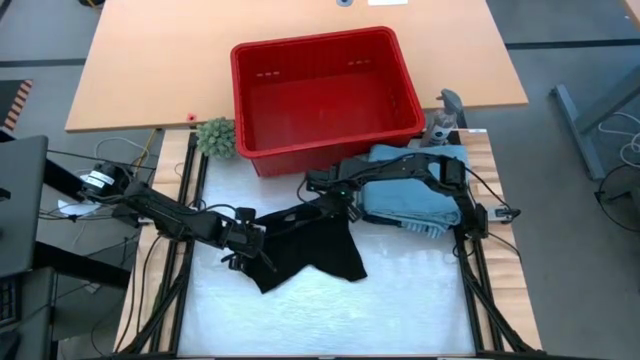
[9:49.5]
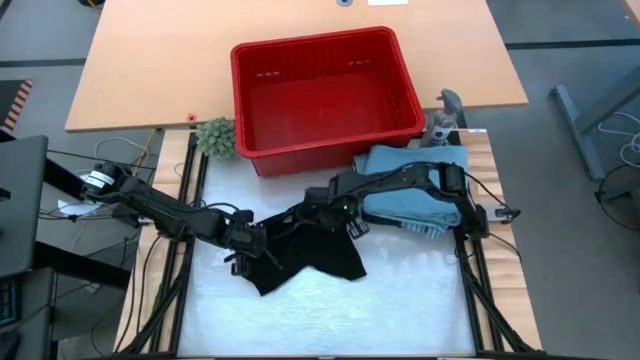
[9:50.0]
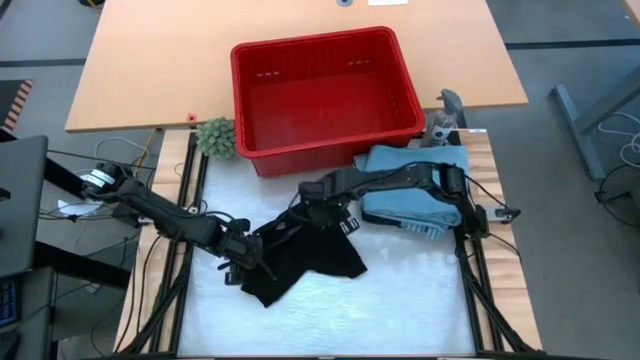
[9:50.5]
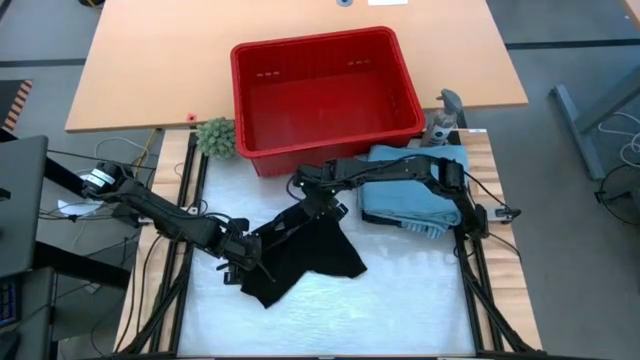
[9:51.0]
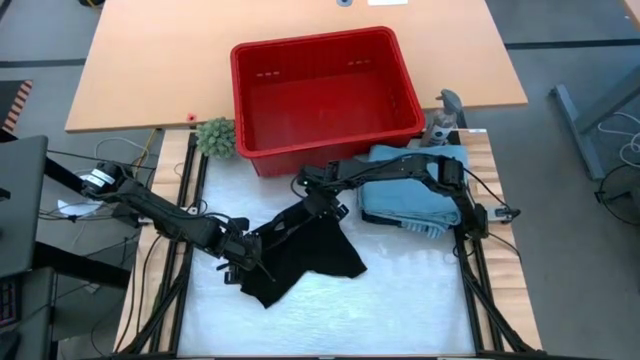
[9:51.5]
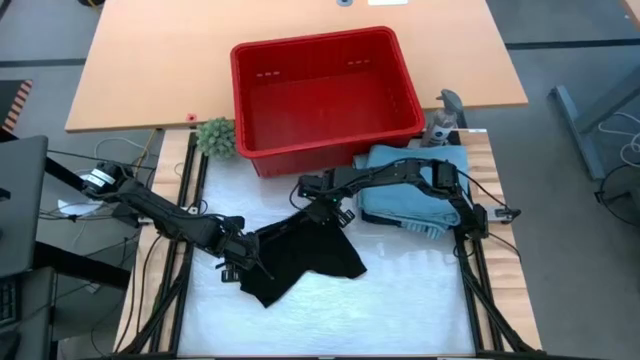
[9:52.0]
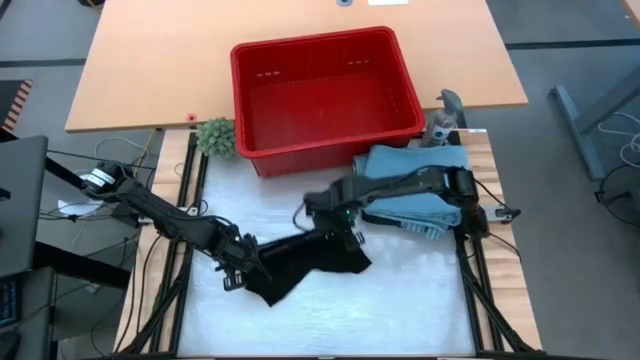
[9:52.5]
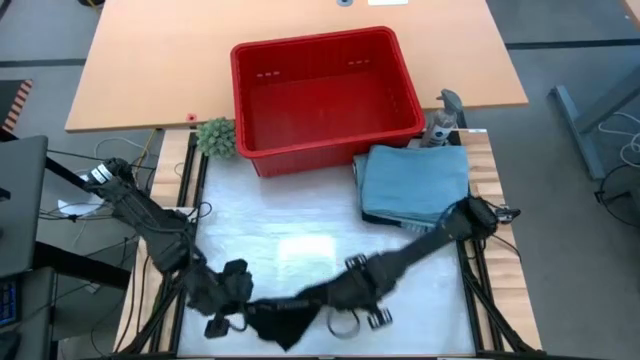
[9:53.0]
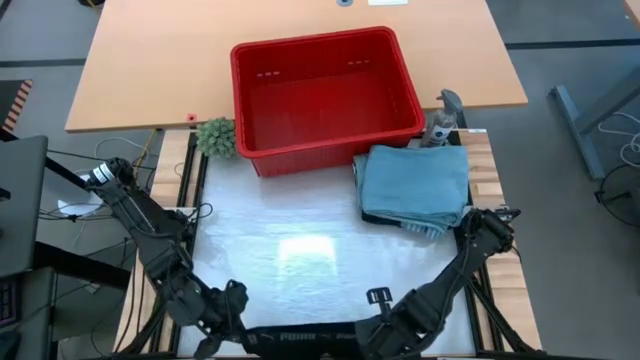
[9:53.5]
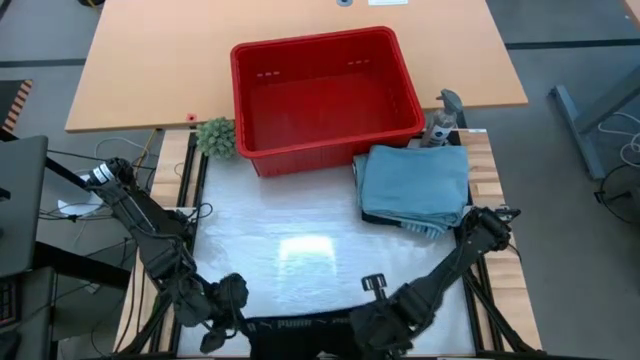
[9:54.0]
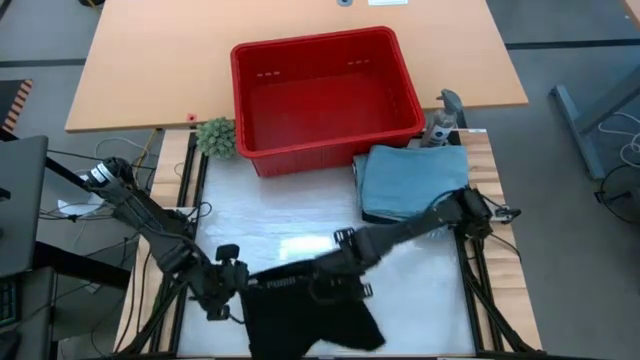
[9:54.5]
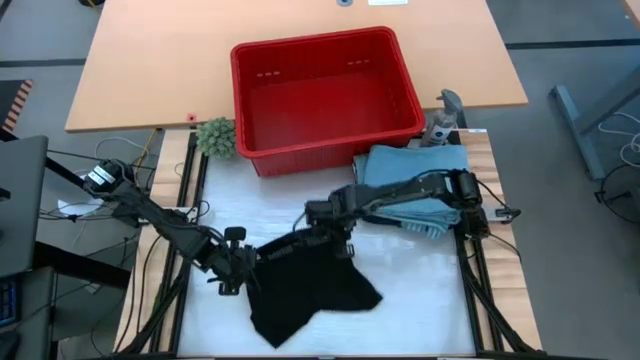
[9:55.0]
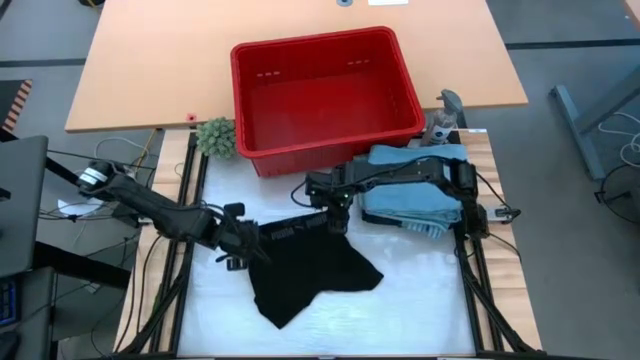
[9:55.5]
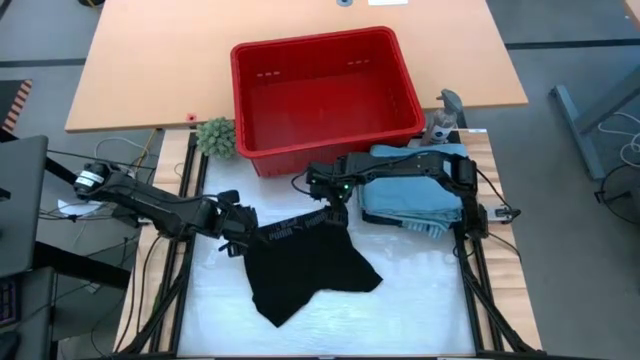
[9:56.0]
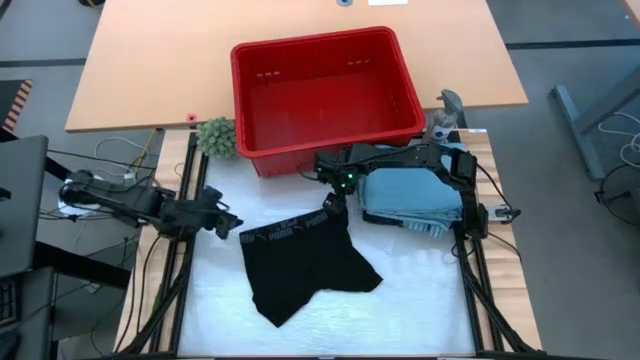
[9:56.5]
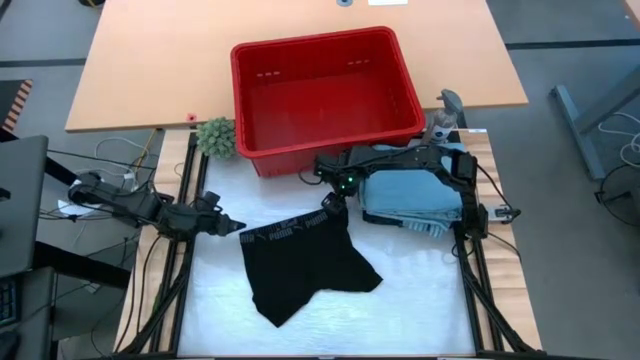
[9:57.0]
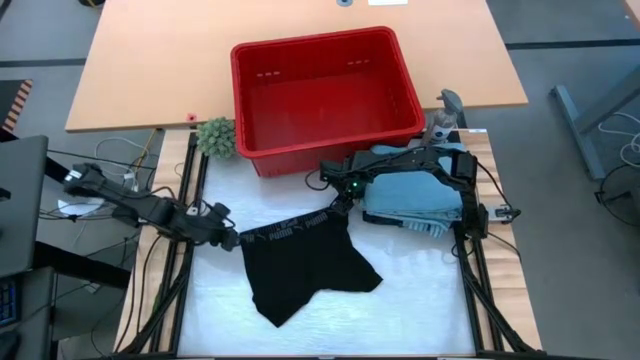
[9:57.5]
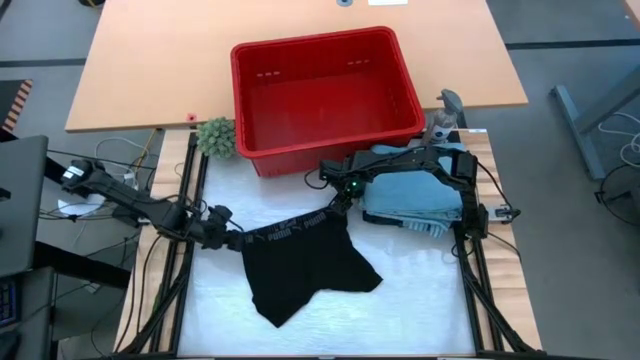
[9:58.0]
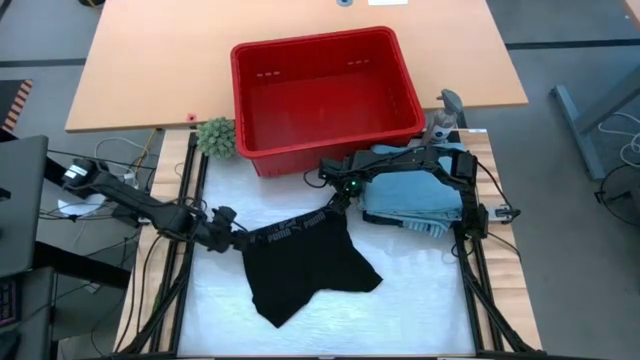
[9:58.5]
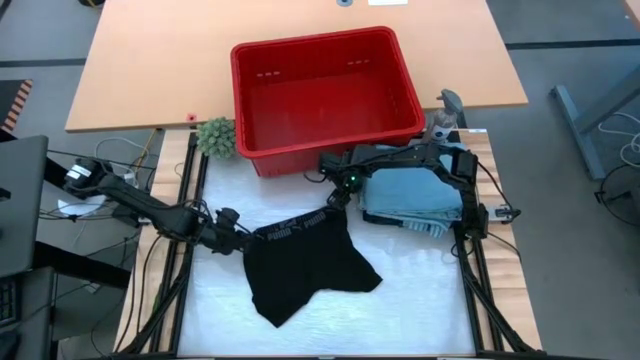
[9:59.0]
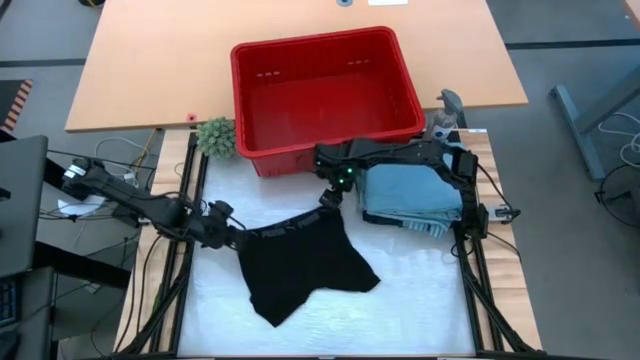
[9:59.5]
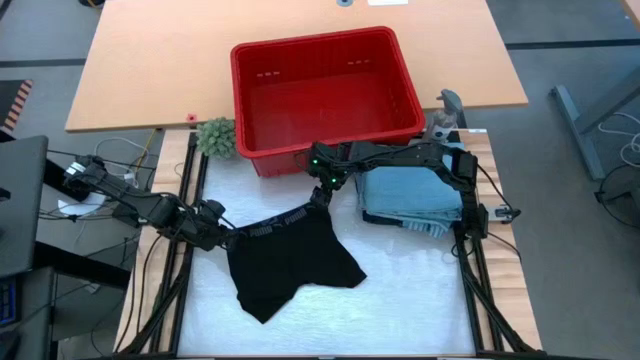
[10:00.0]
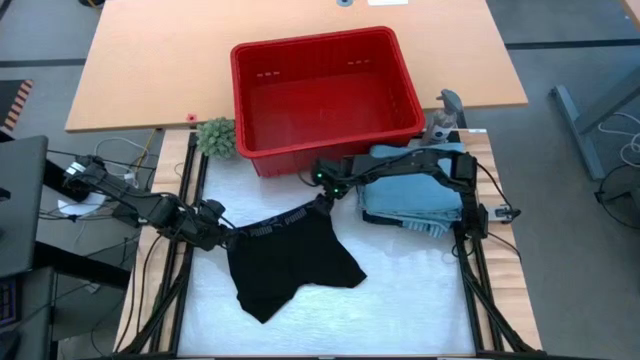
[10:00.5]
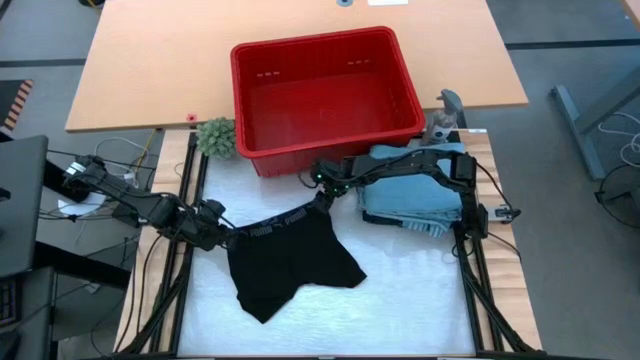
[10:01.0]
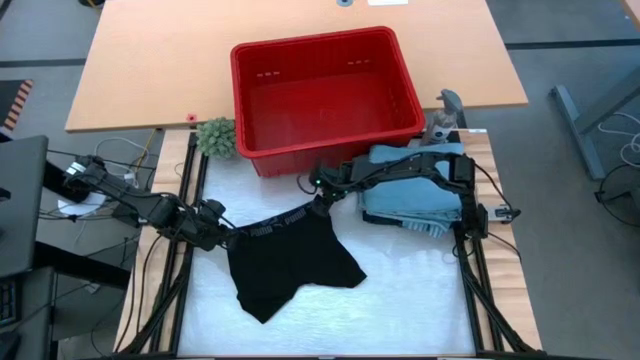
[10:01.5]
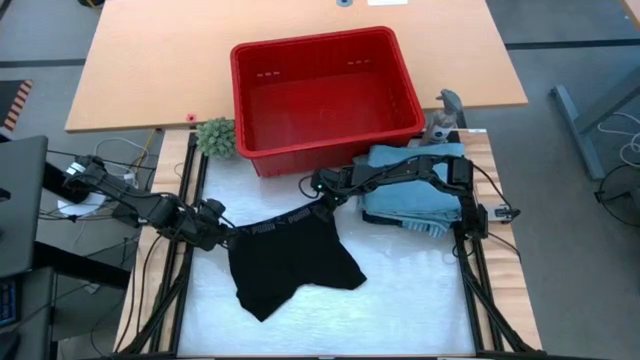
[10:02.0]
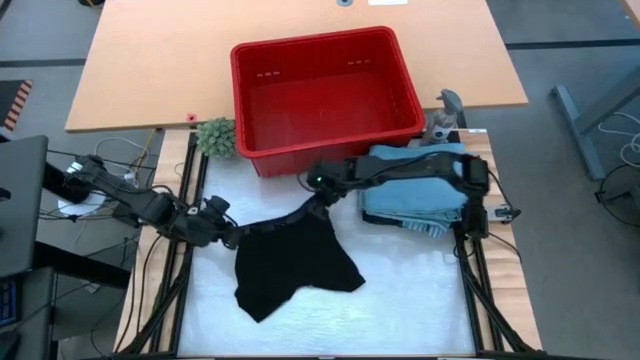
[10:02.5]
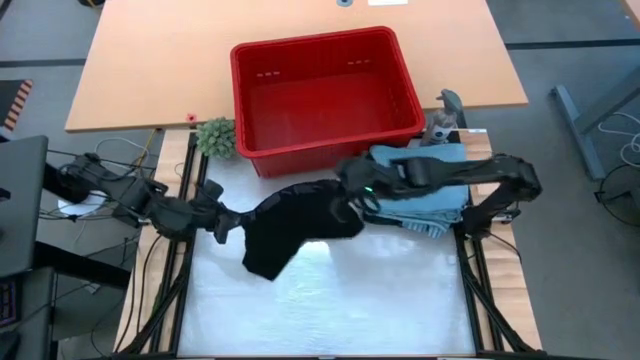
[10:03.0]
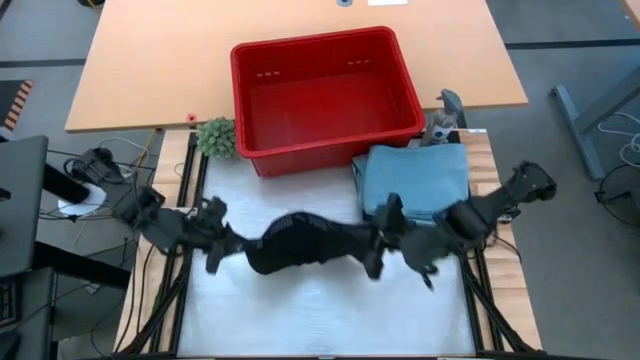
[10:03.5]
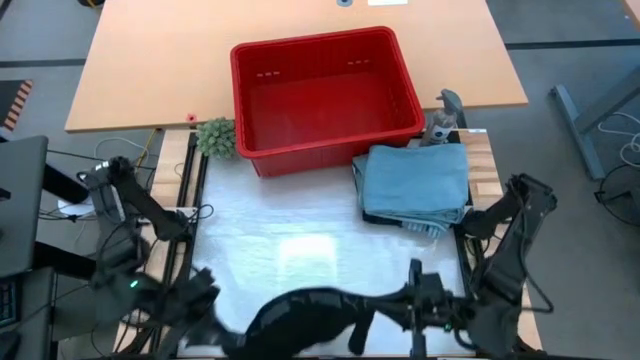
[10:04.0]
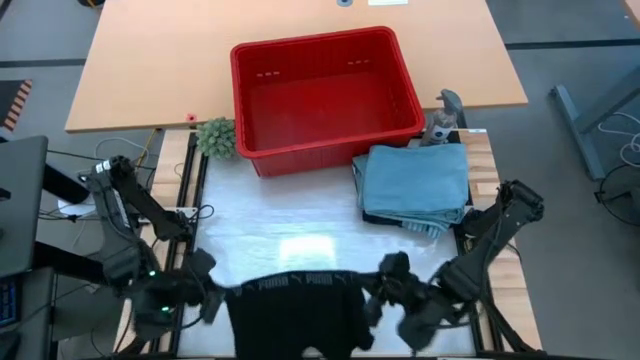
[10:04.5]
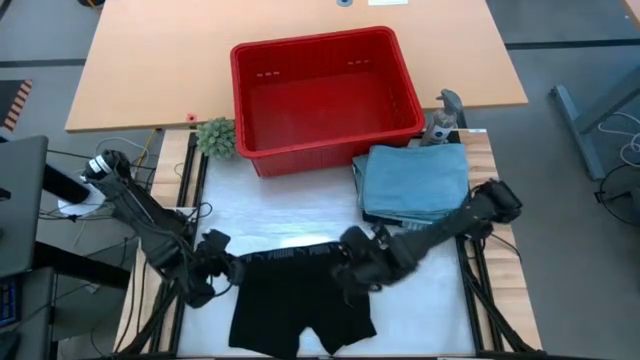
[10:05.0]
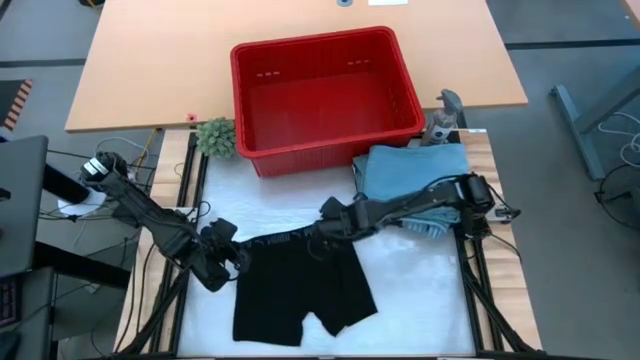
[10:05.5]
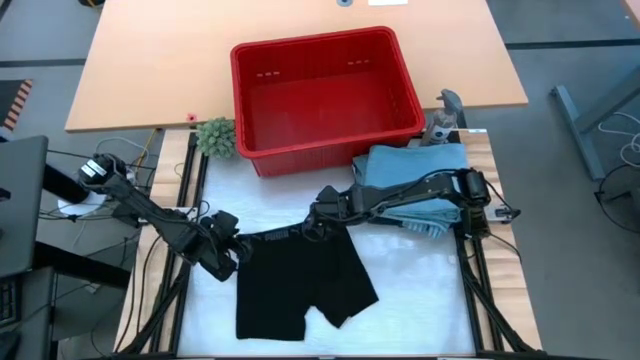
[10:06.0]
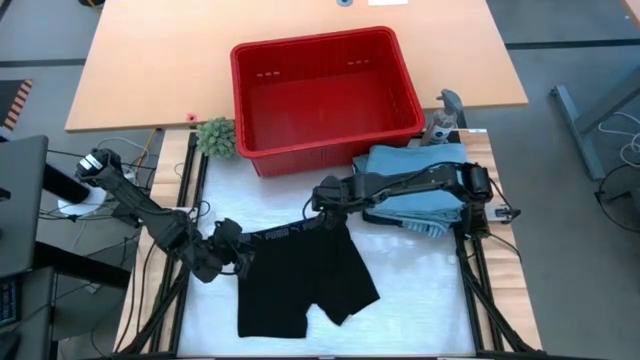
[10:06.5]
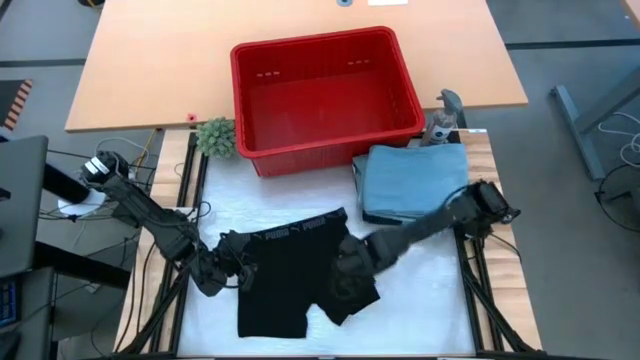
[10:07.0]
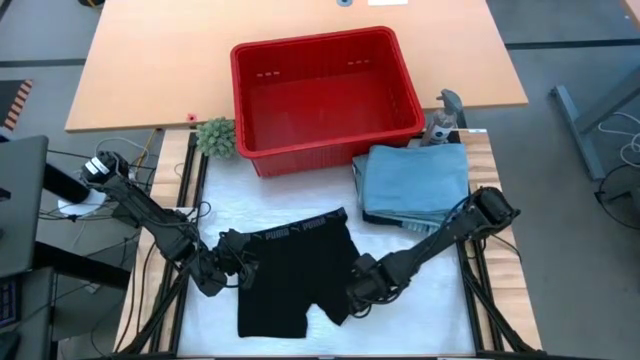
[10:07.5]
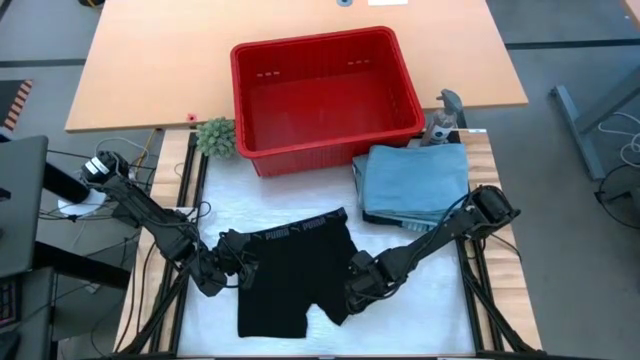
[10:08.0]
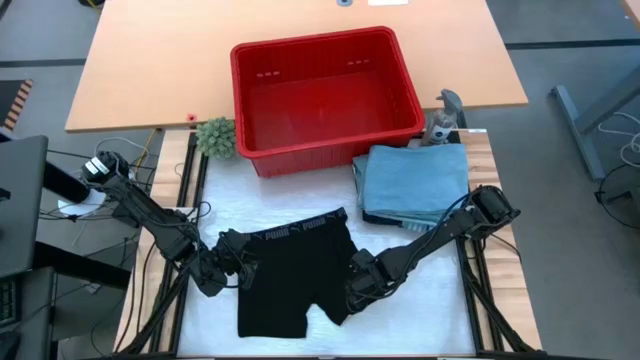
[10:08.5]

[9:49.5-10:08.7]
Task: Fold Laundry from Bin
Fold the black boxer short

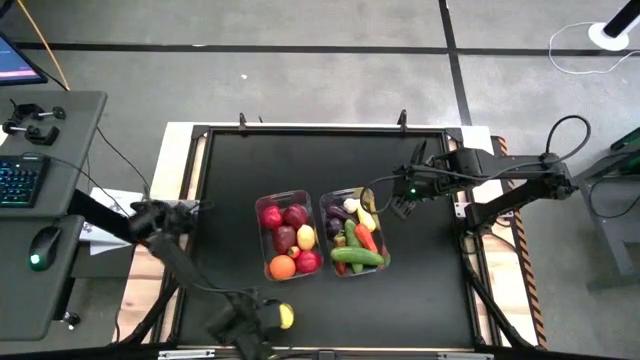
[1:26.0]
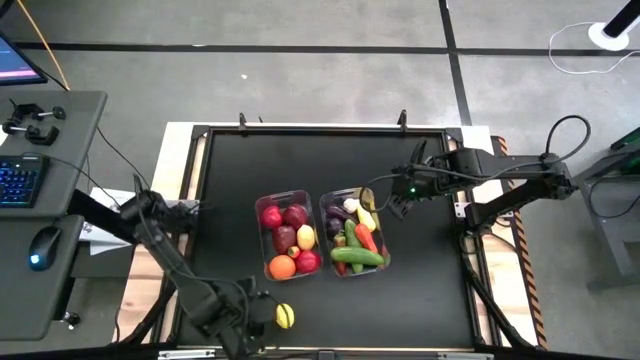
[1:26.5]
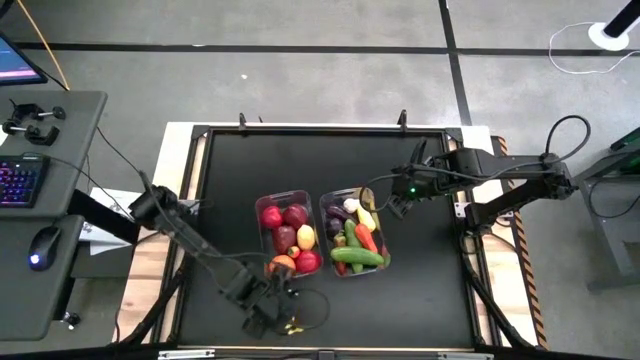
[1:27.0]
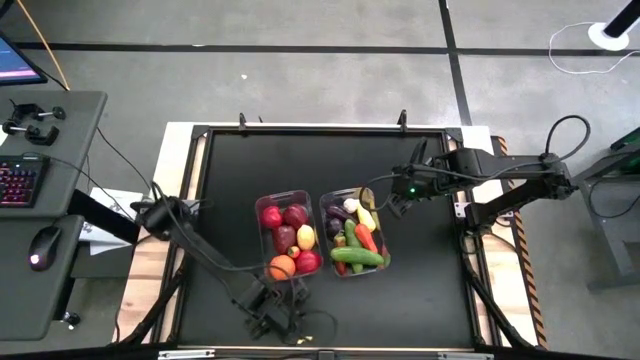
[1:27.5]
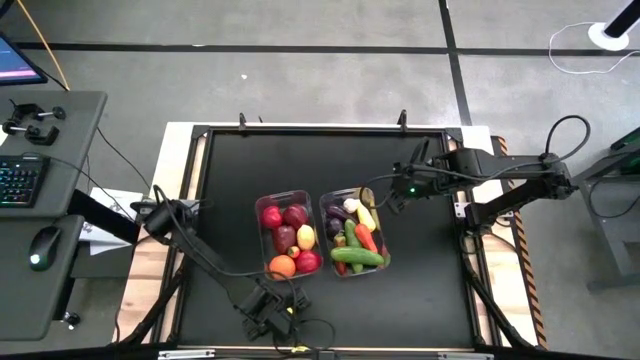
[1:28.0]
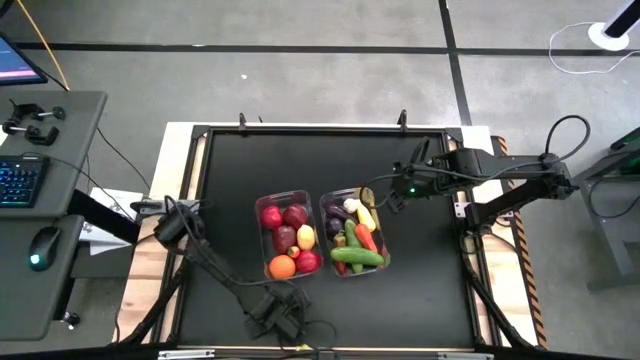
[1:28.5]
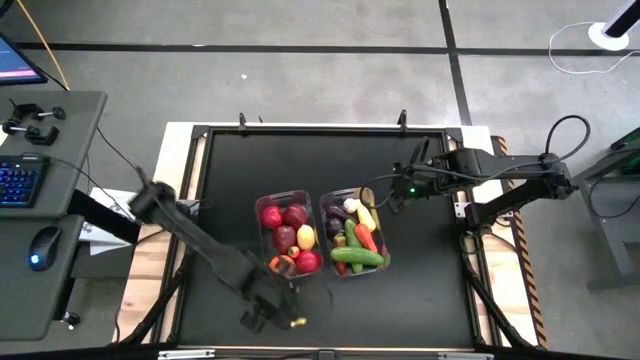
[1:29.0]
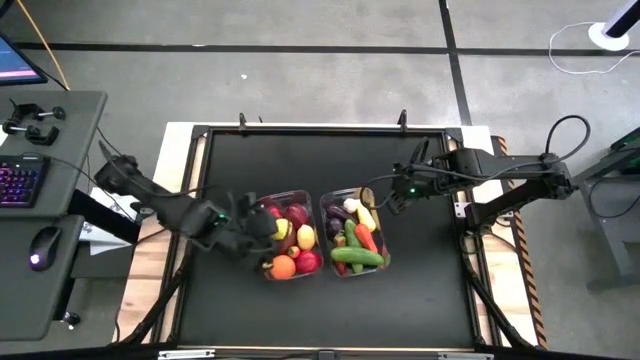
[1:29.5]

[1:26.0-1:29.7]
Task: Sort produce into baskets
Put the lemon into the left transparent bin
